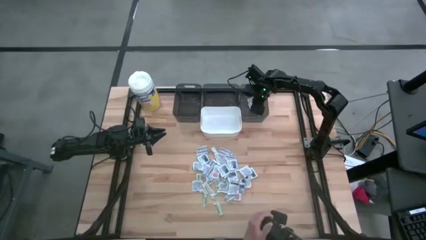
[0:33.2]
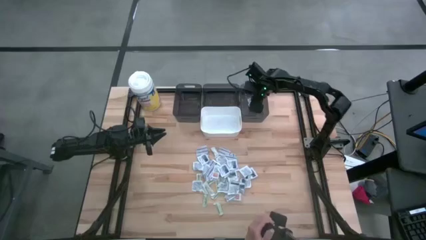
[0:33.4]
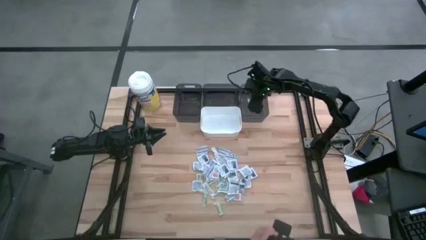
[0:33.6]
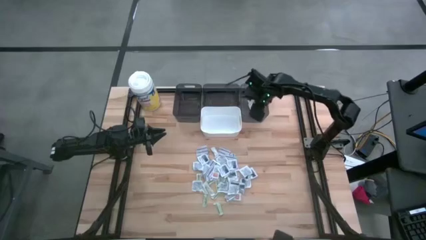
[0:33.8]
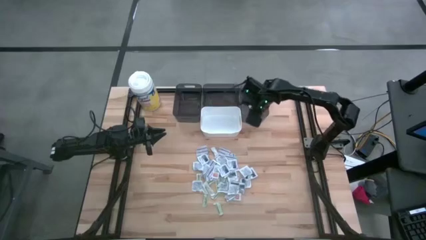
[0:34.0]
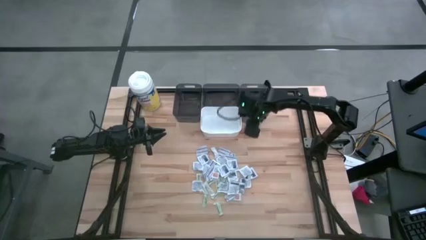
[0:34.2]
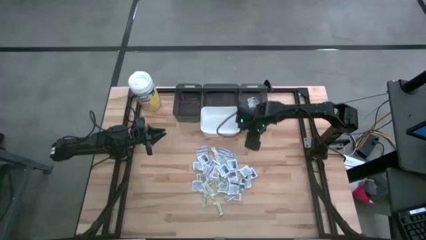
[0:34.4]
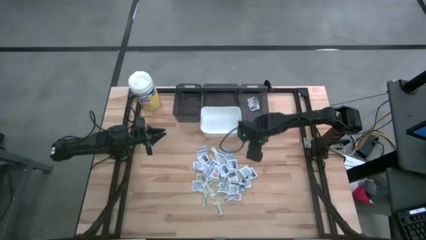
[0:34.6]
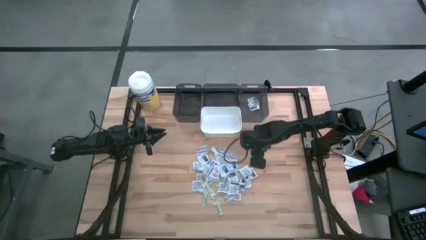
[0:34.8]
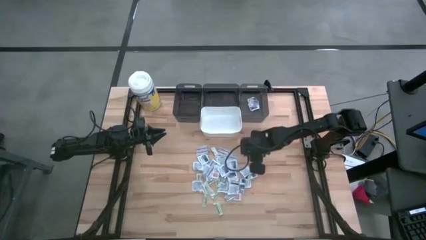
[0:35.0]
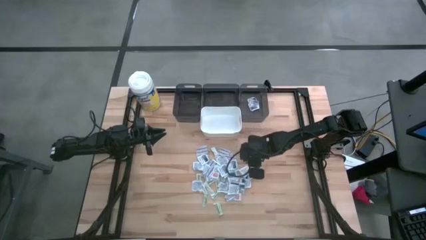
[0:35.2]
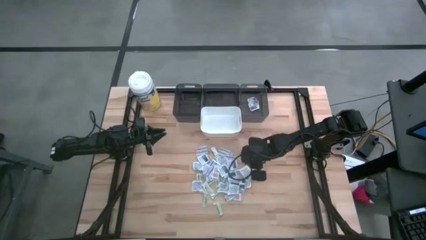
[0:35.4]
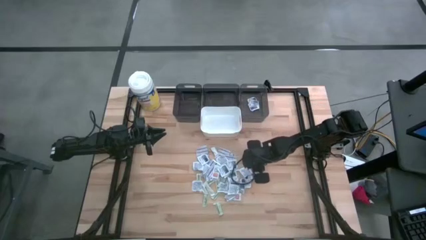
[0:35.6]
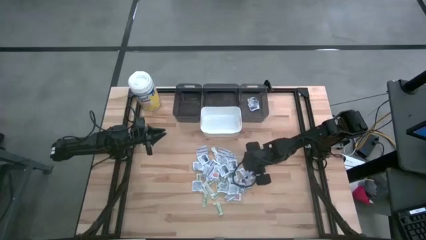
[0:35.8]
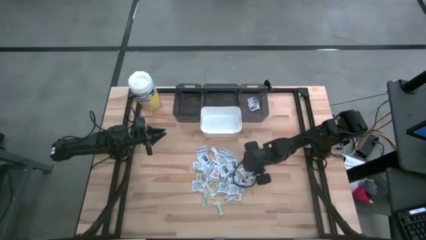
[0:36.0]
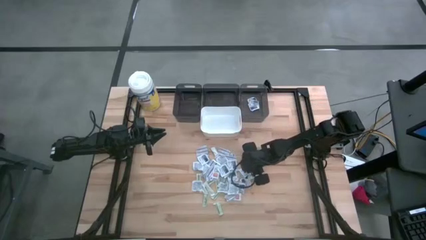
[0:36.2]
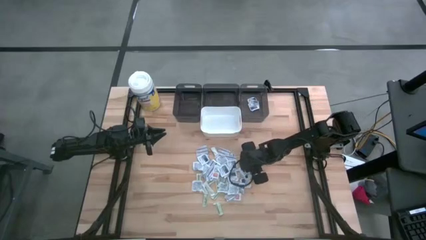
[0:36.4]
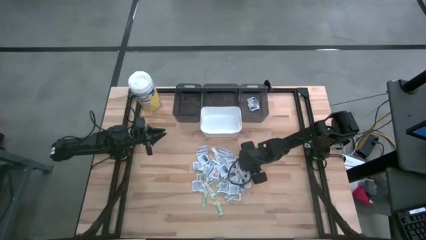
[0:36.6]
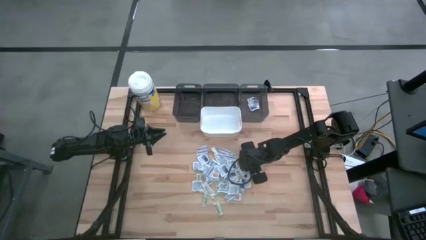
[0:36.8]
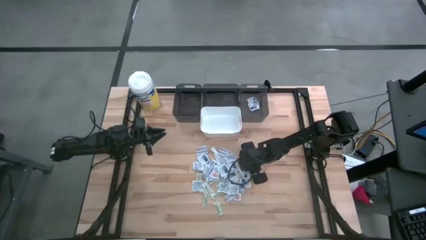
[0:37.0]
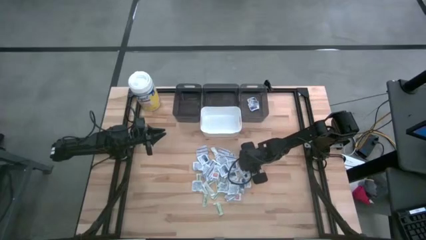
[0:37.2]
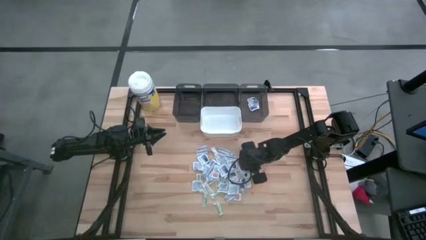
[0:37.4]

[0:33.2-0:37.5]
Task: Pick & Place First Aid Supplies
Put the blue alcohol pad into the right black bin

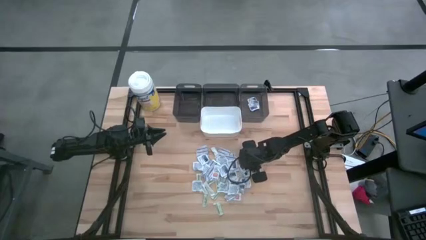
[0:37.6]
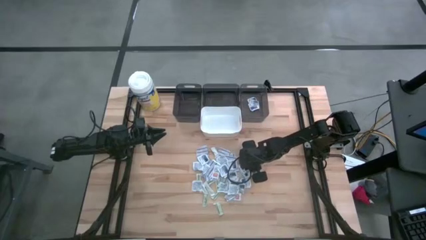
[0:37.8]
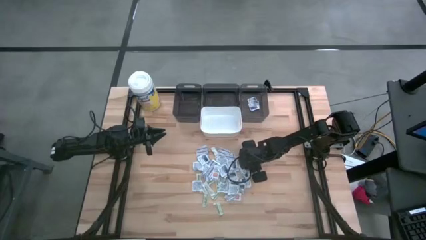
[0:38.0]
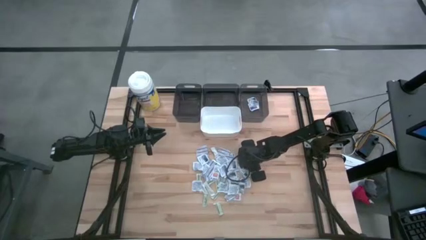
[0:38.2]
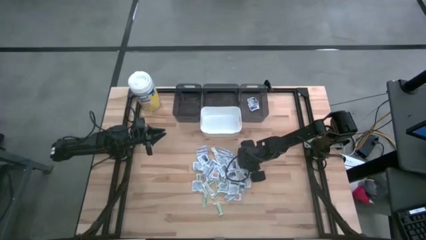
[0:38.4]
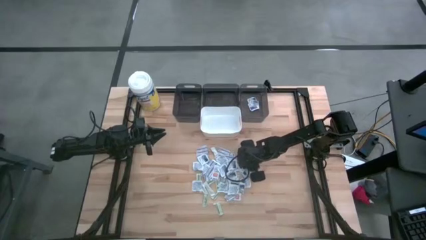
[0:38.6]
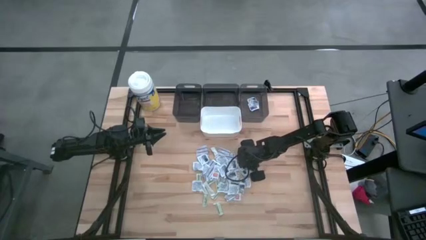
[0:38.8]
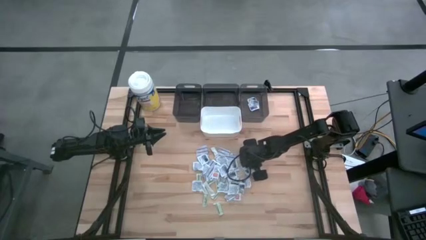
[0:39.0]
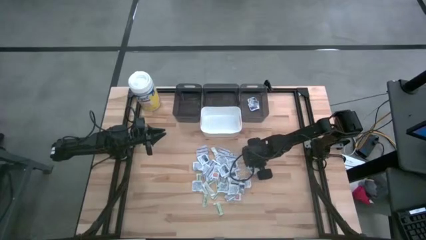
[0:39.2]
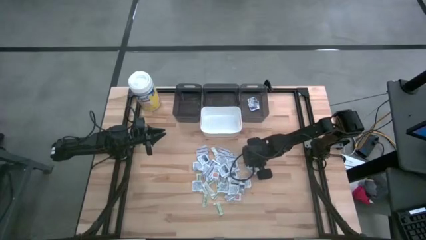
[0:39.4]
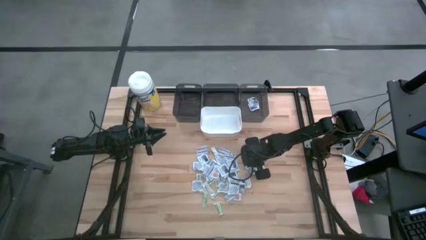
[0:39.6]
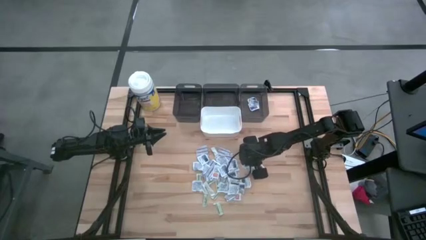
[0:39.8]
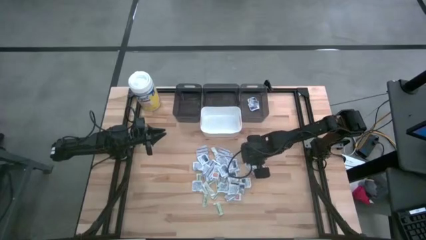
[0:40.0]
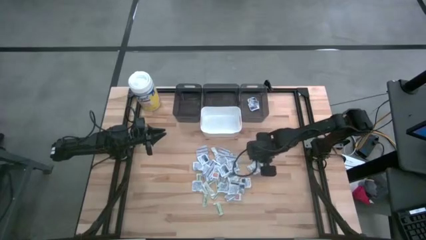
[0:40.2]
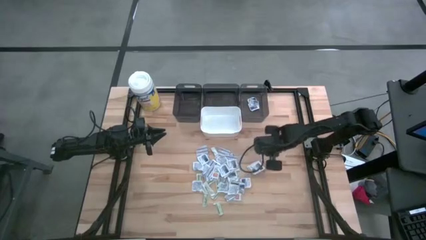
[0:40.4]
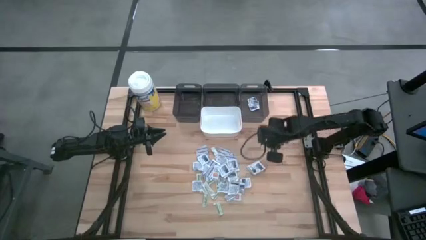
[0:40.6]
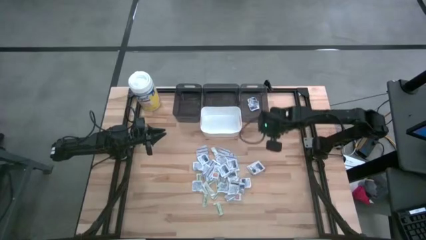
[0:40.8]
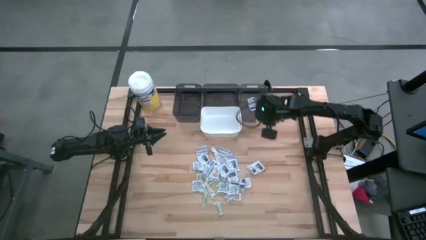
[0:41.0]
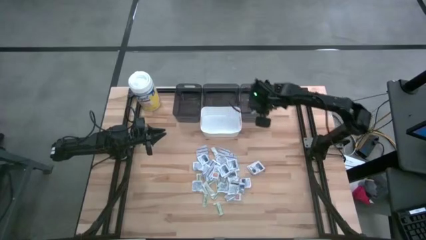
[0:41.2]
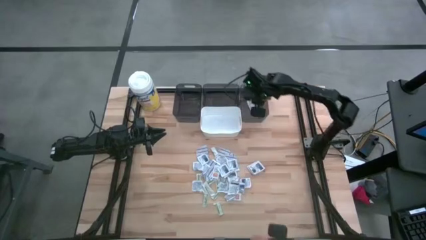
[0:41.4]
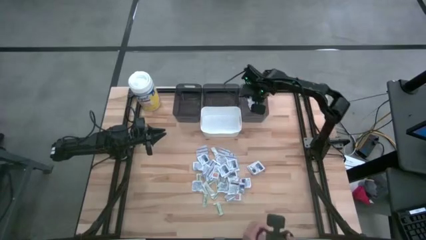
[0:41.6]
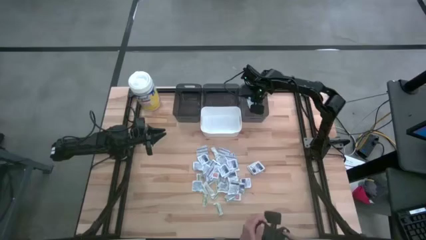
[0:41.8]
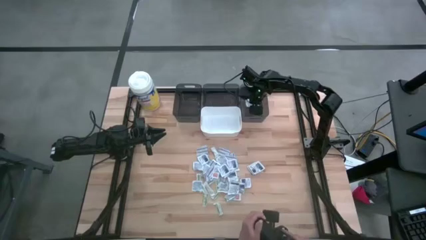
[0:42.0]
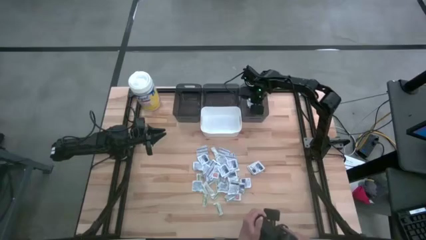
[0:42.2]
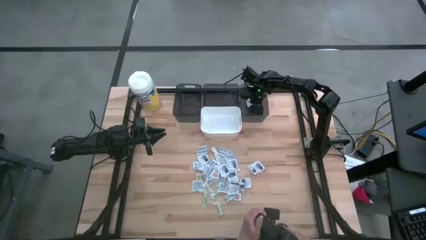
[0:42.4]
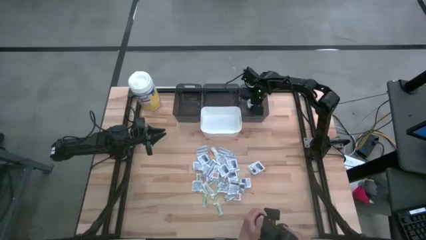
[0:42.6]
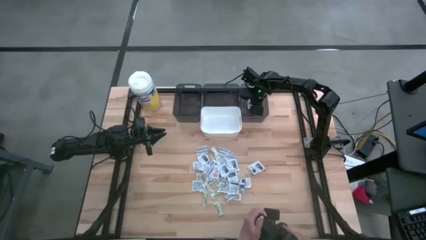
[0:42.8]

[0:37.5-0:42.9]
Put the blue alcohol pad into the right black bin

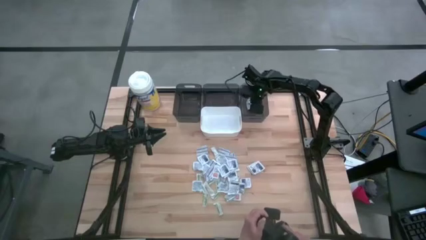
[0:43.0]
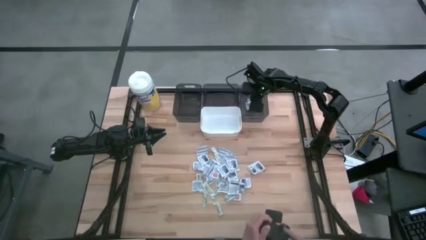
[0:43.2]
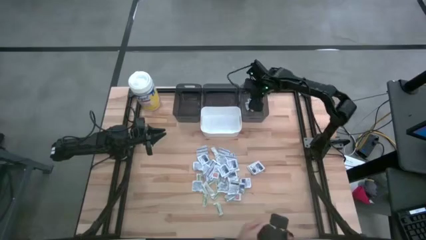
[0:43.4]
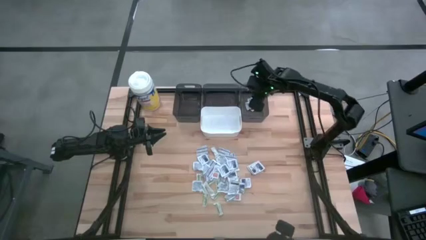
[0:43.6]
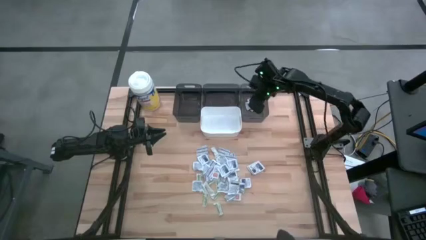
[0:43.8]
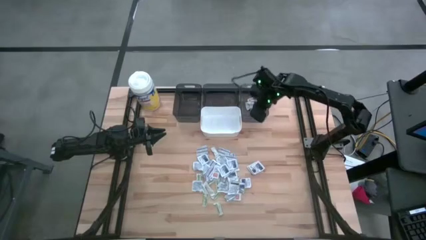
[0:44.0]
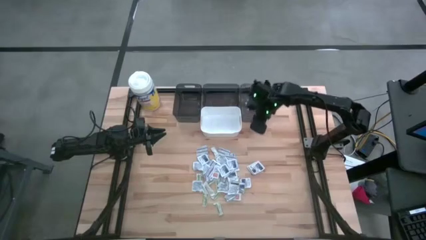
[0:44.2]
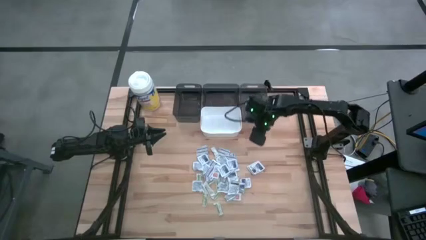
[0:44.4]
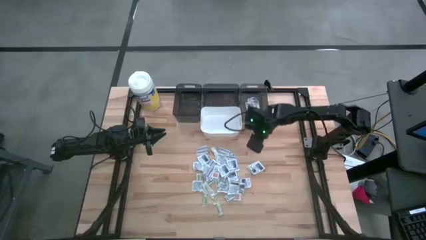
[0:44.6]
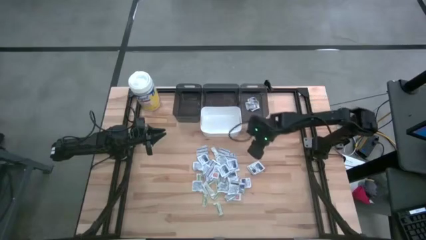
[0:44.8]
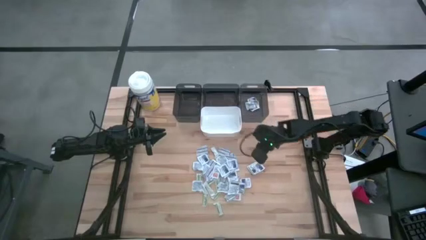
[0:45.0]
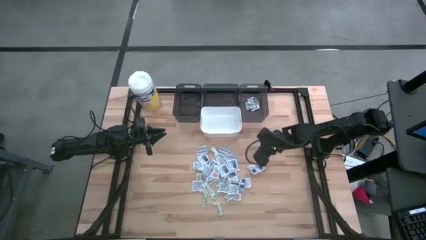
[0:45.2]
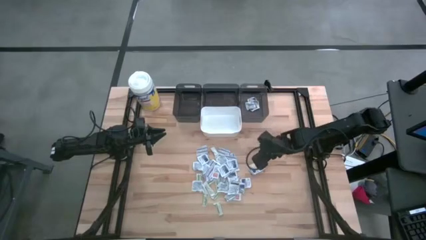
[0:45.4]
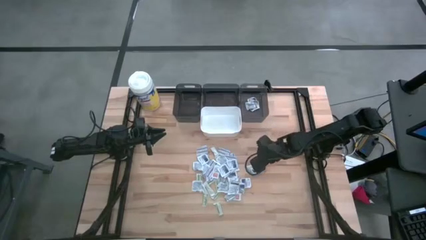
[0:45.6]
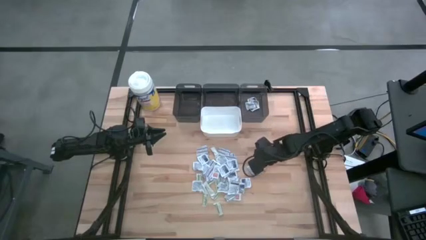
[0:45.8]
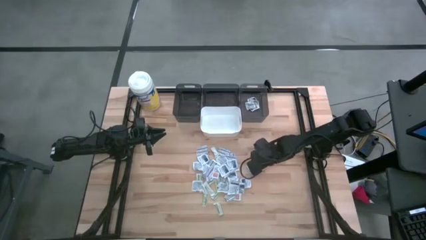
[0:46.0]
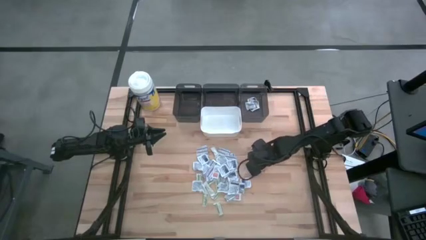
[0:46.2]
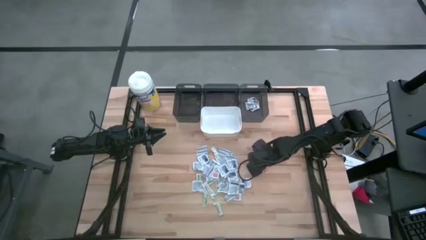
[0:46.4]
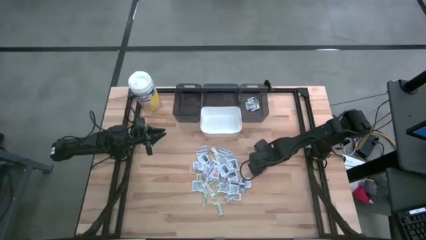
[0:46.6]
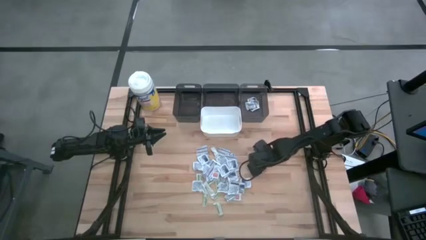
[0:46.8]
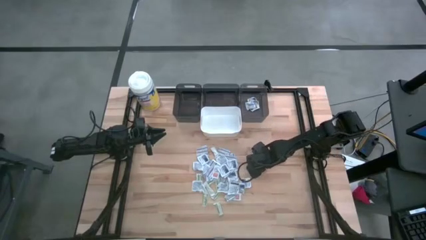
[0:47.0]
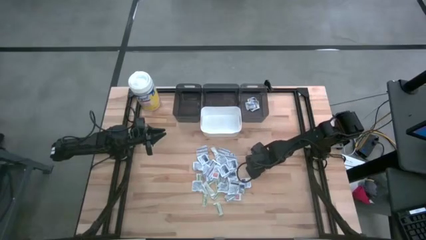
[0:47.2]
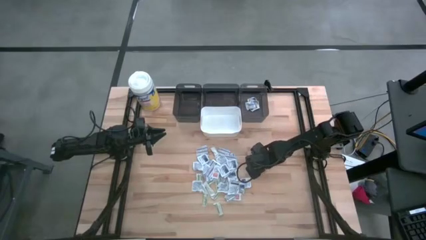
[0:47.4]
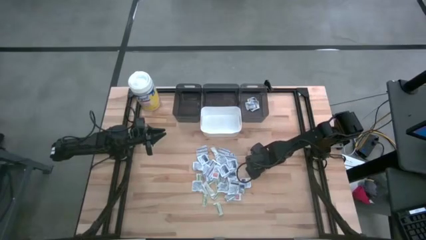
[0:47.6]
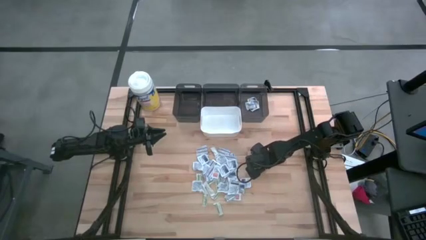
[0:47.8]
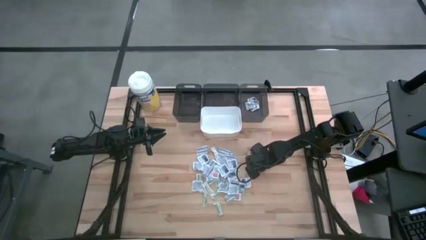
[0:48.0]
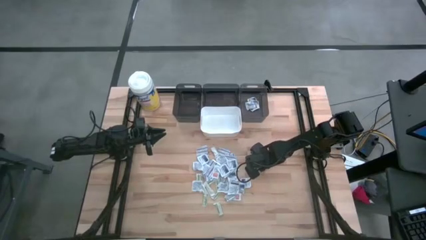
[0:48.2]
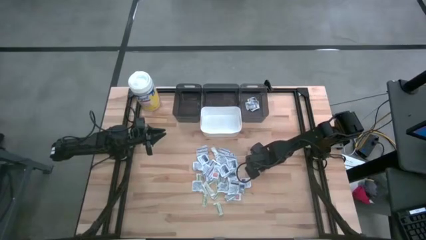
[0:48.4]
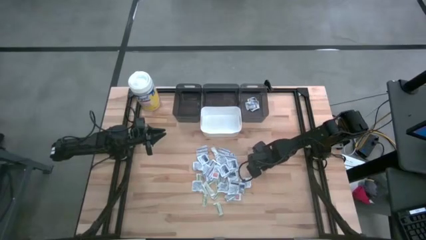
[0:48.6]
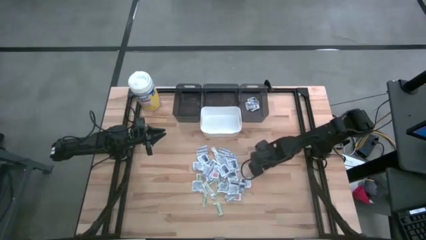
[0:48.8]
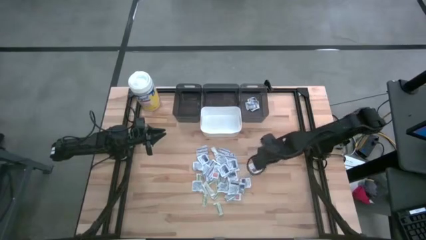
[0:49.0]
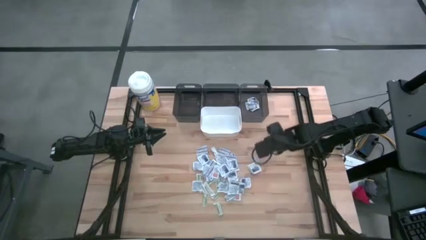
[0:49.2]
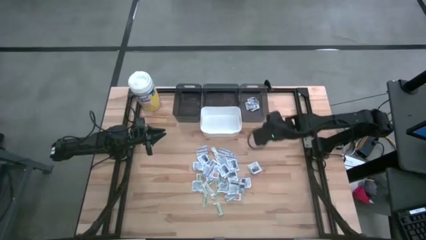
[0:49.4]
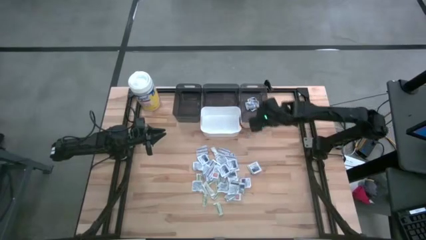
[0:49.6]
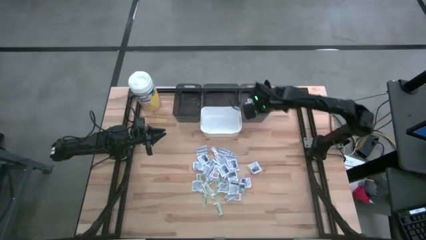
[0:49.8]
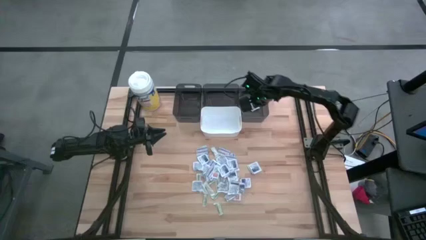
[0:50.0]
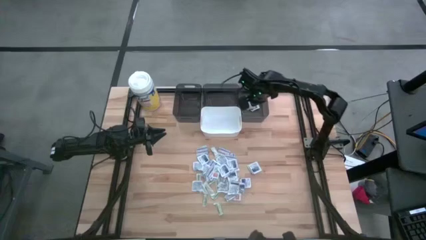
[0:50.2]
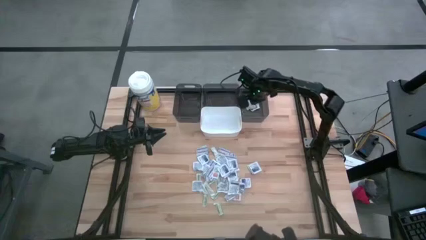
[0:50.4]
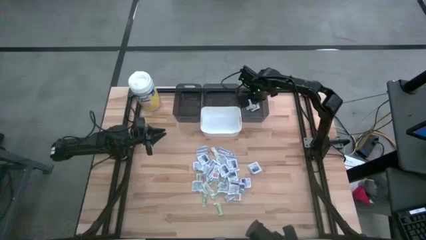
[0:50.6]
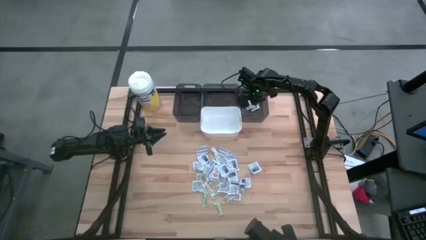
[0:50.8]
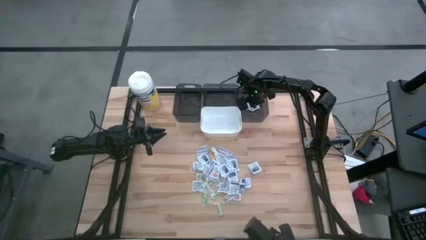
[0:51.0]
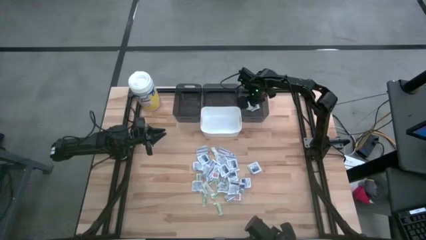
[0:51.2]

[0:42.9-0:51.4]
Put the blue alcohol pad into the right black bin
